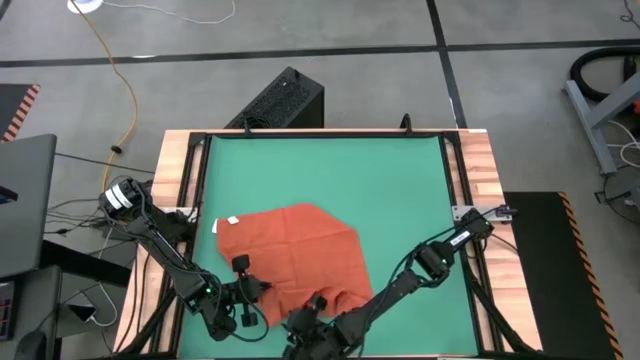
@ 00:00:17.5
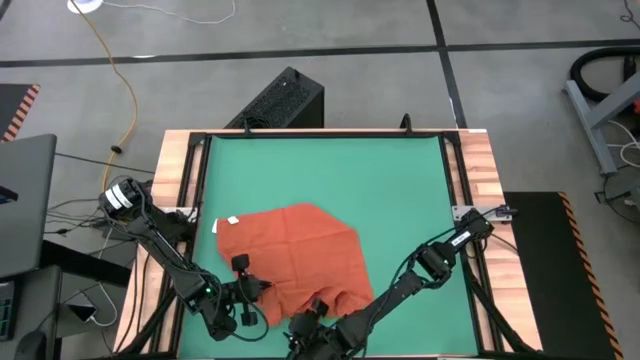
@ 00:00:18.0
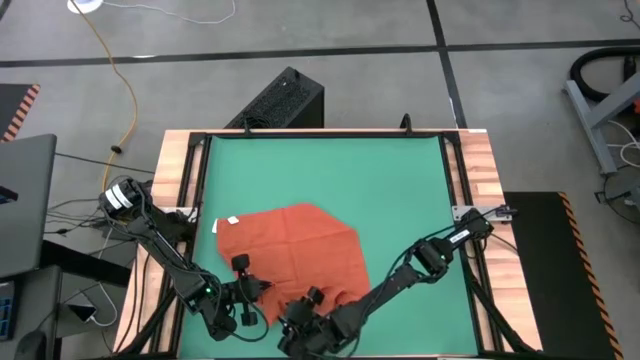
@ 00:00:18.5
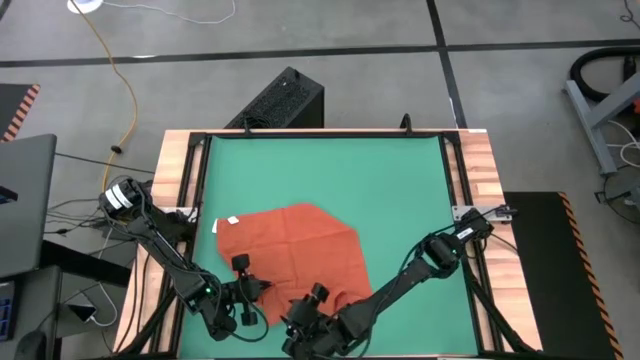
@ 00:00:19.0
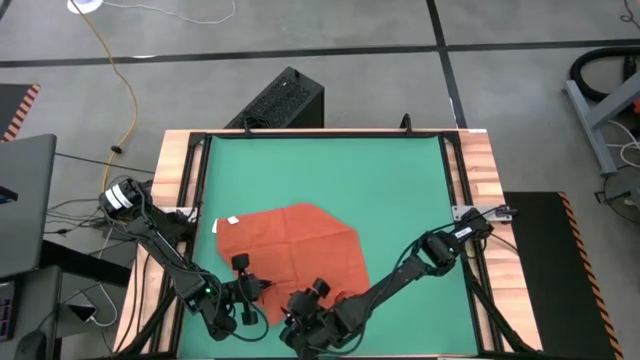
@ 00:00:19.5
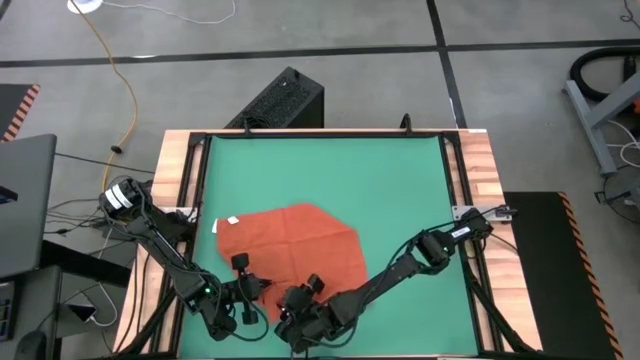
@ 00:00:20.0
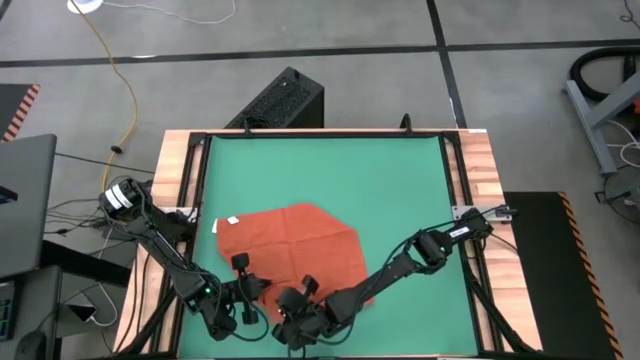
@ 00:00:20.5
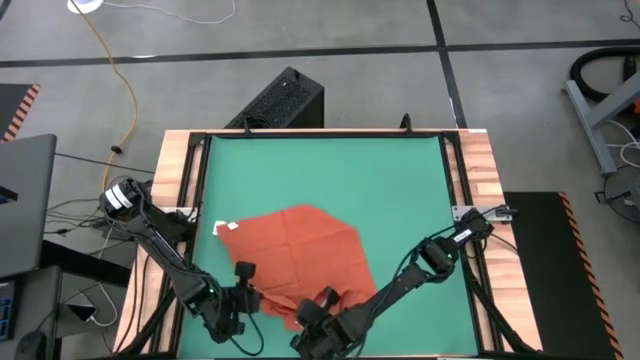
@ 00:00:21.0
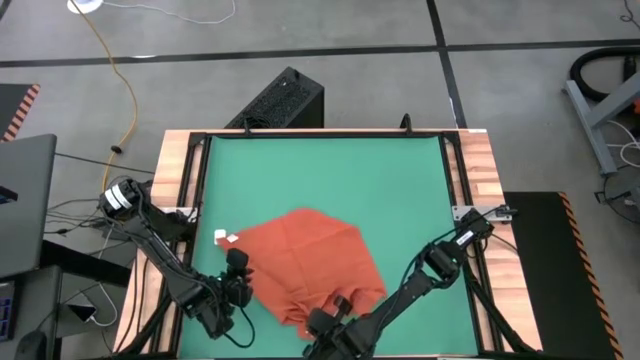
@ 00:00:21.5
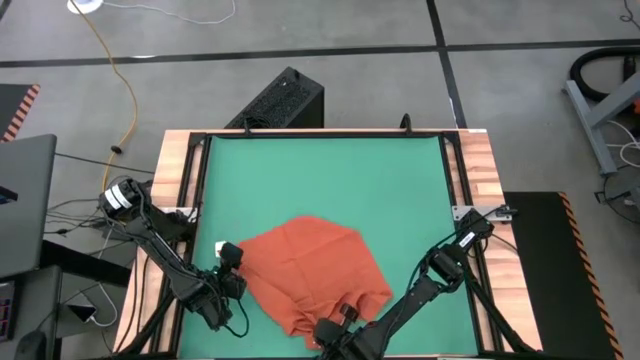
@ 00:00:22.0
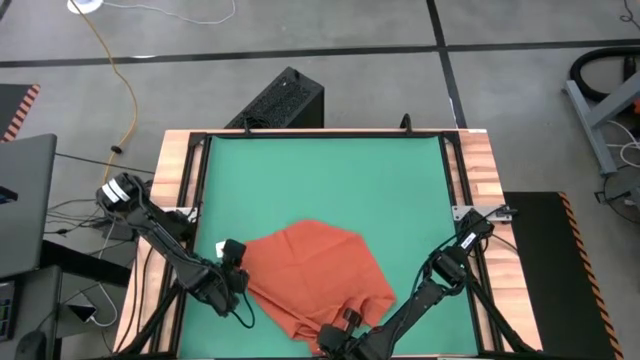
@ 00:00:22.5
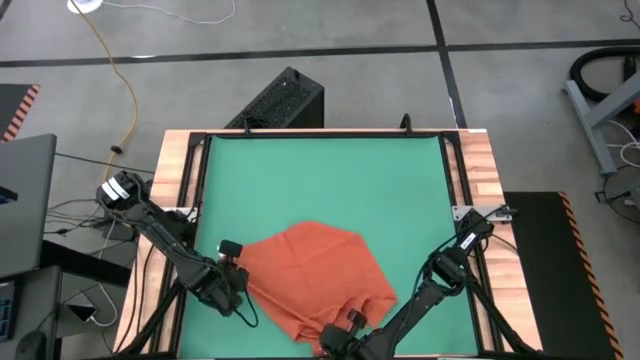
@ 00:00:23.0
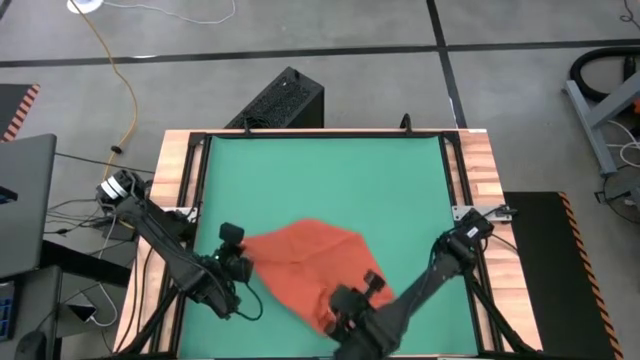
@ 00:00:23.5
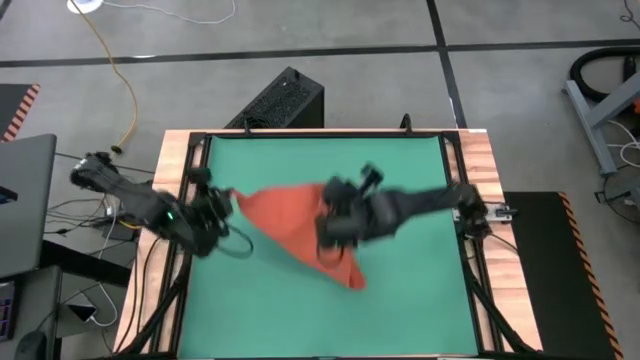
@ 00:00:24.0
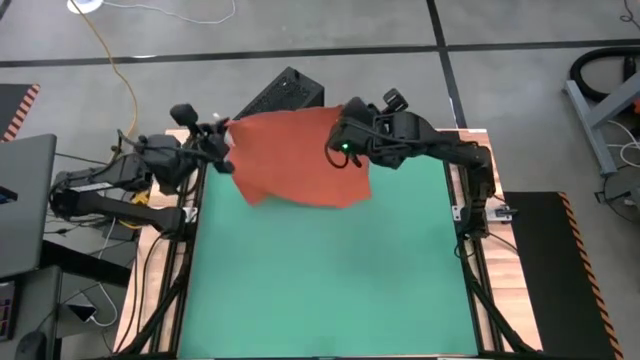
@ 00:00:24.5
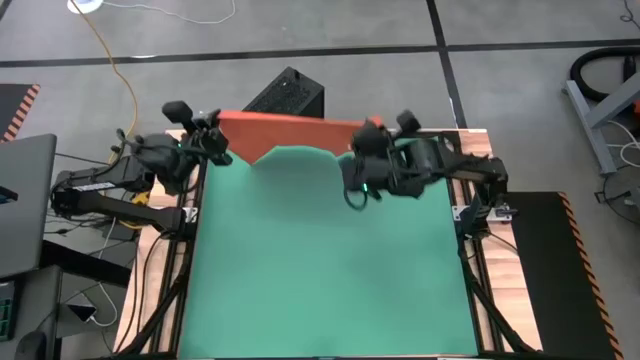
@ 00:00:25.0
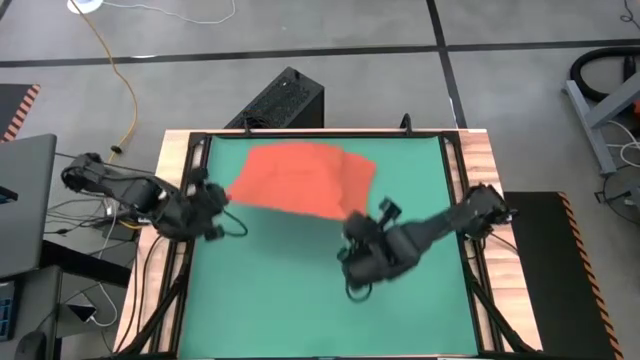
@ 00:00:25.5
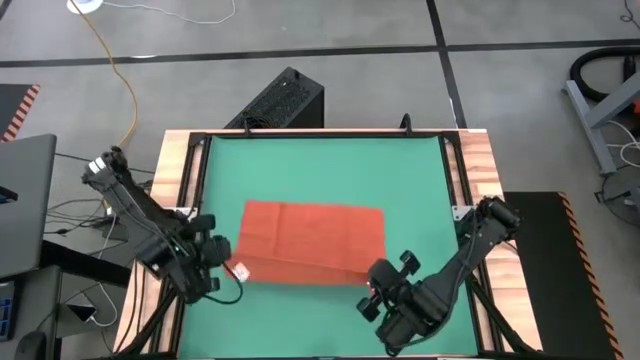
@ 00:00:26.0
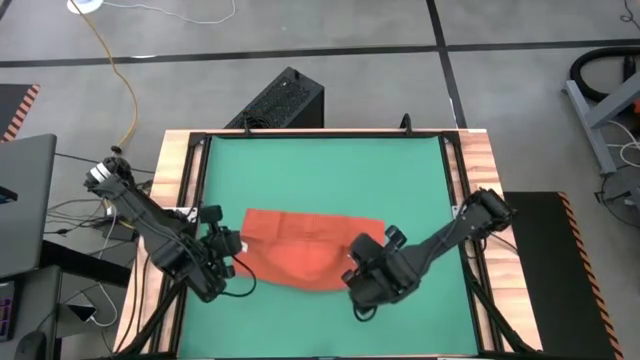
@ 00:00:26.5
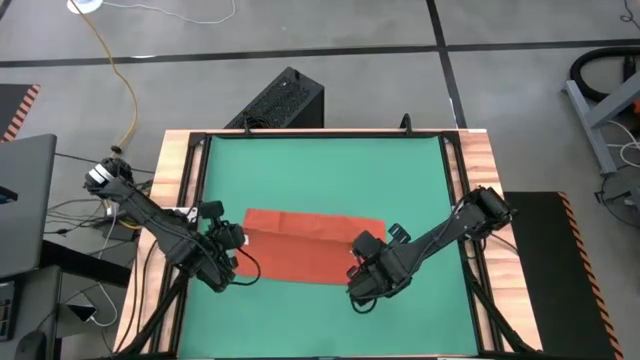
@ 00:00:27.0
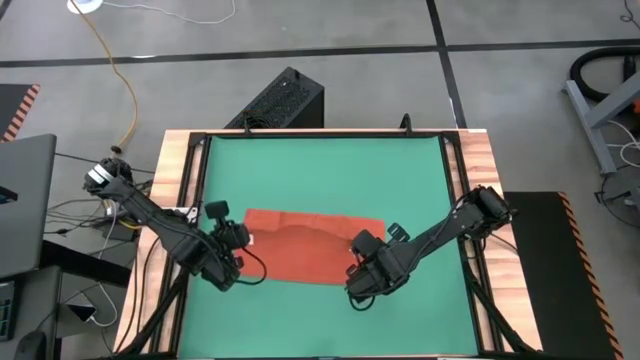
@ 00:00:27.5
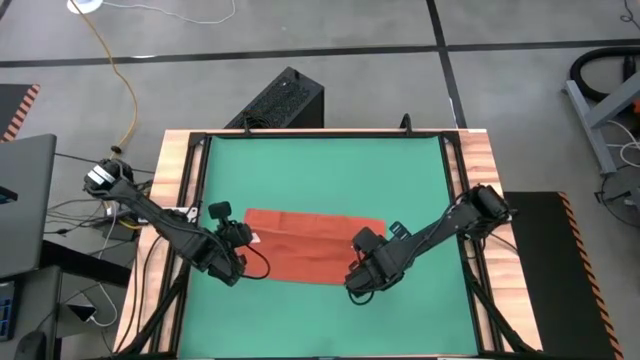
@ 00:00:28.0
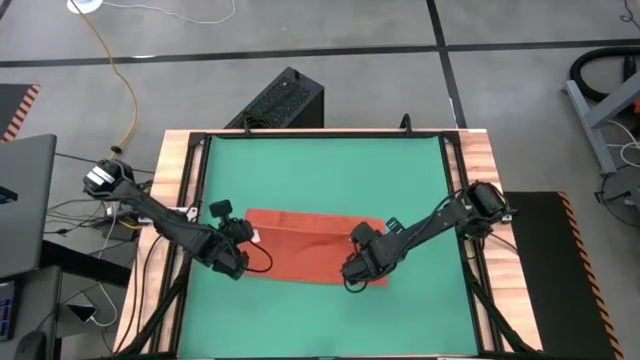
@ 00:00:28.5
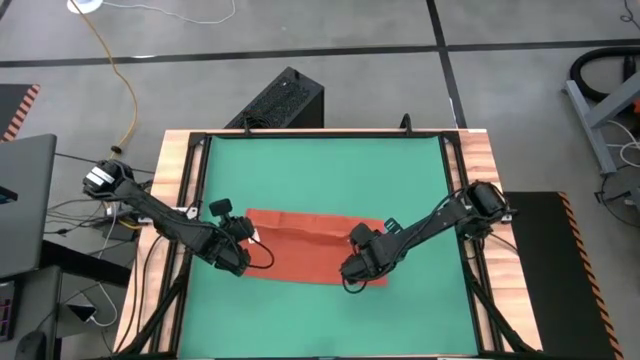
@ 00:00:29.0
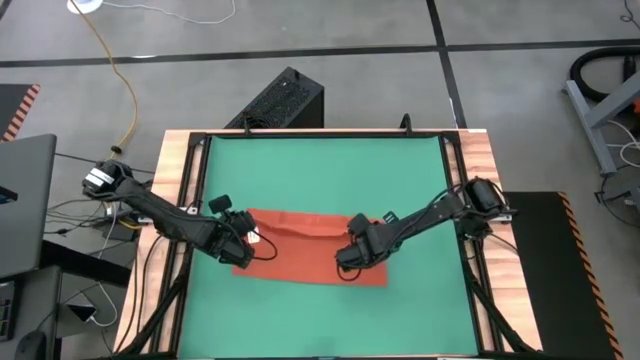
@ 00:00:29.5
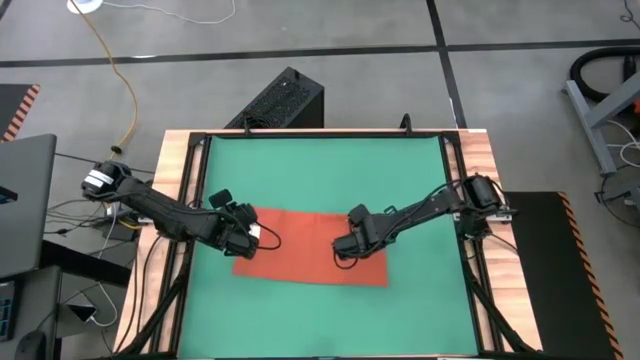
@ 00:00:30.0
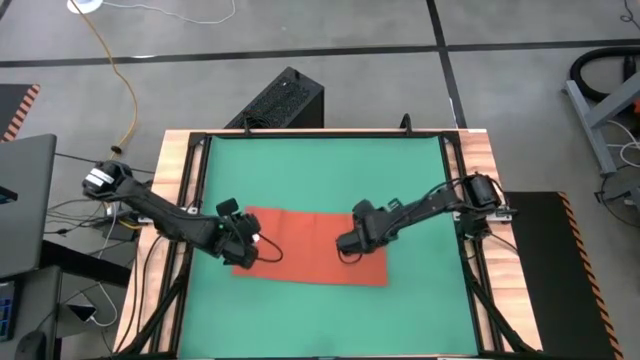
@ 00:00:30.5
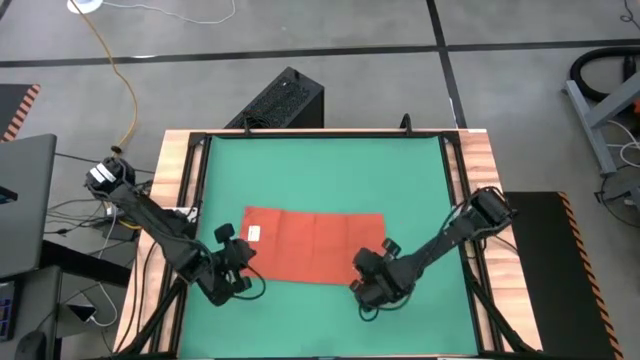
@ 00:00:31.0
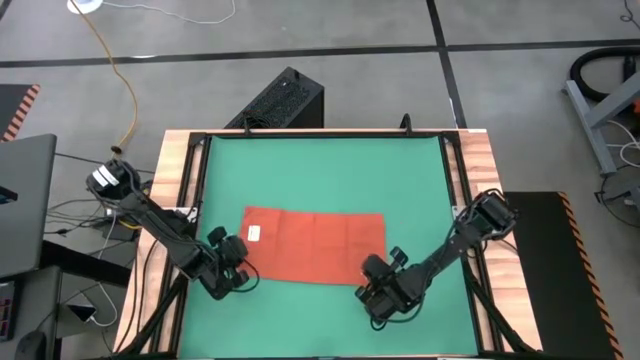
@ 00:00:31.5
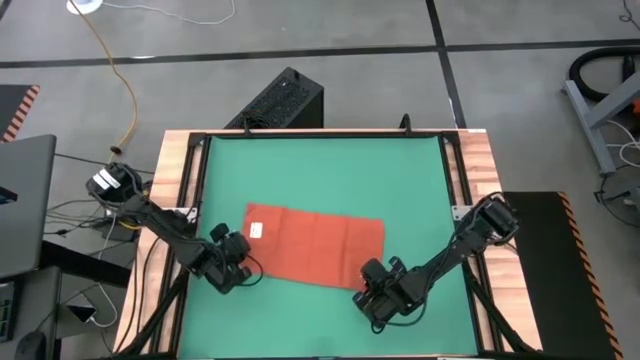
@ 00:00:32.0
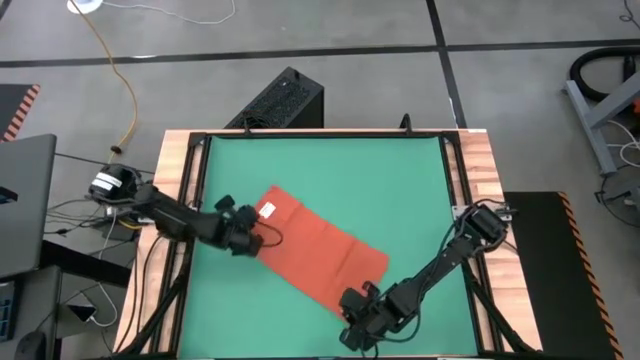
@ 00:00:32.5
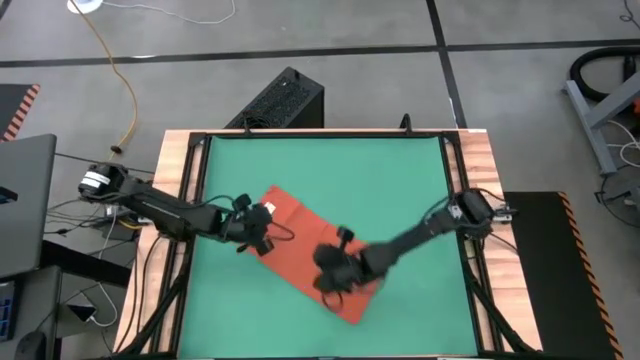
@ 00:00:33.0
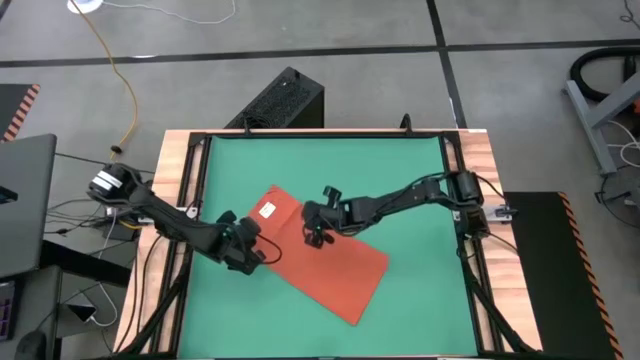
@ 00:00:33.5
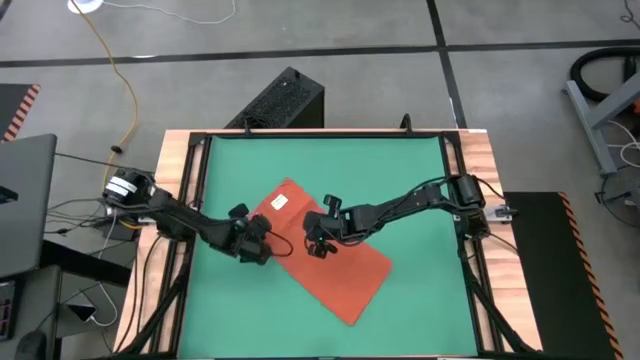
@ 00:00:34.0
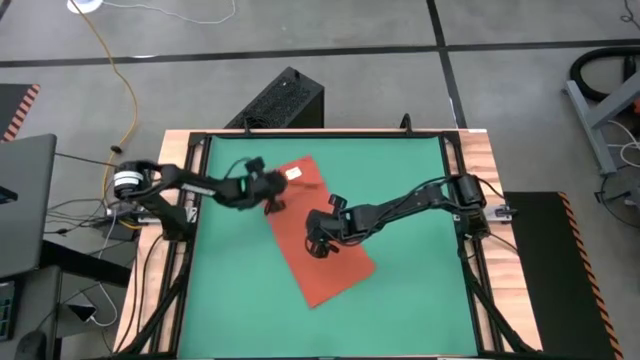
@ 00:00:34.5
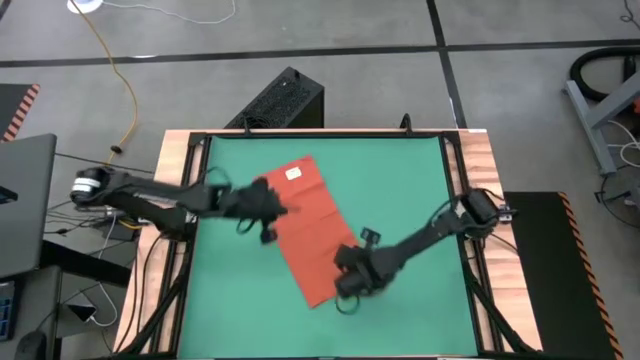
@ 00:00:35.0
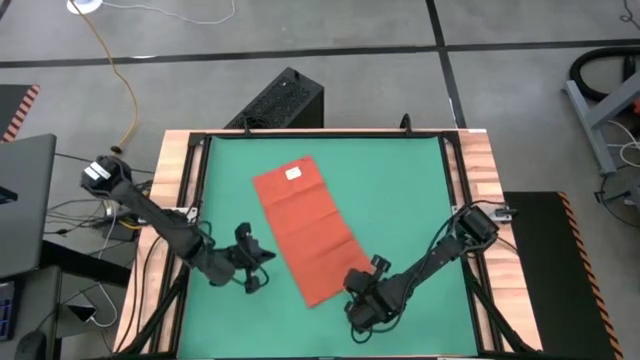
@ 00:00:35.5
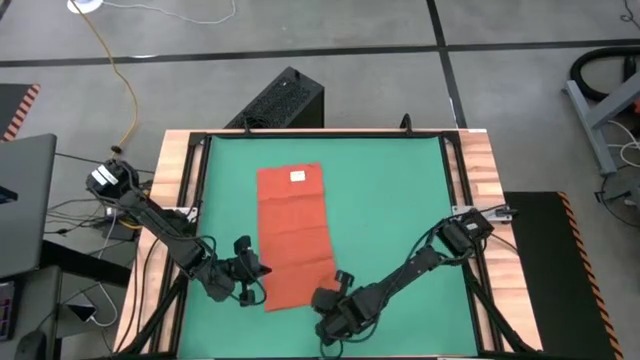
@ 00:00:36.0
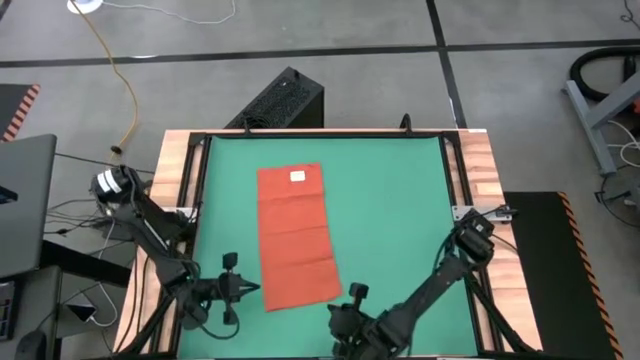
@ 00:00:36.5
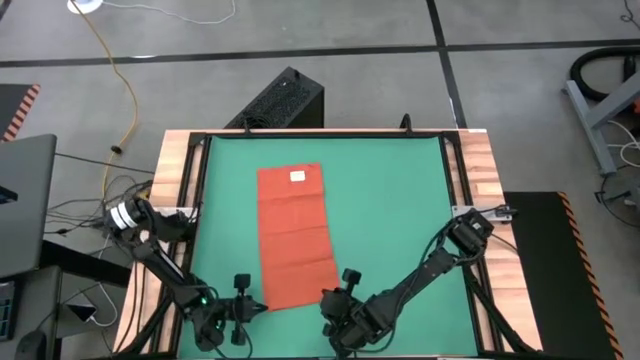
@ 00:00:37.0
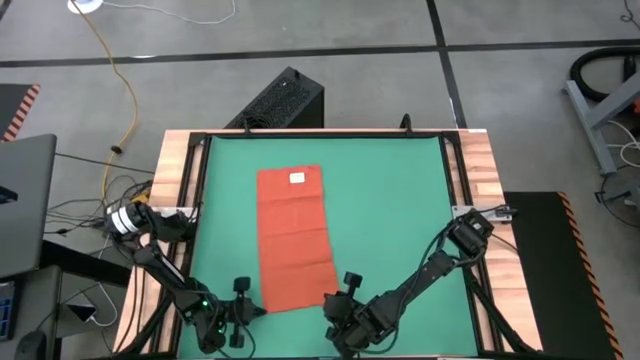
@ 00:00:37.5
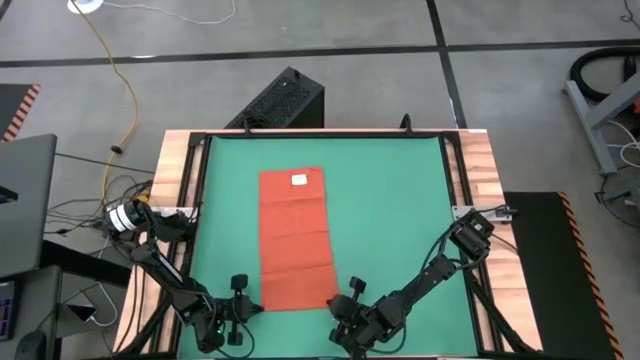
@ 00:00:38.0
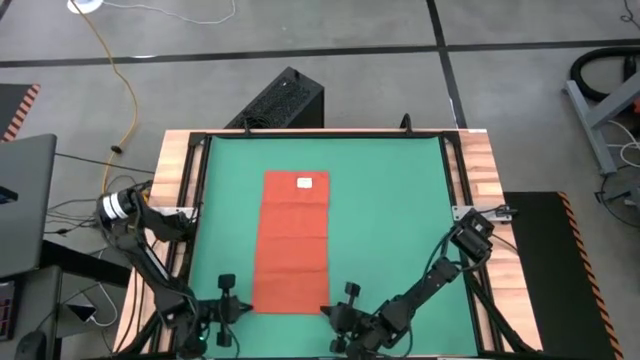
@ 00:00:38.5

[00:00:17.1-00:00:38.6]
Task: Roll towel
Fold the orange towel
